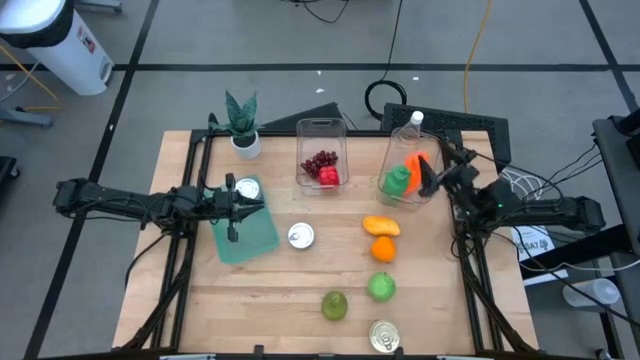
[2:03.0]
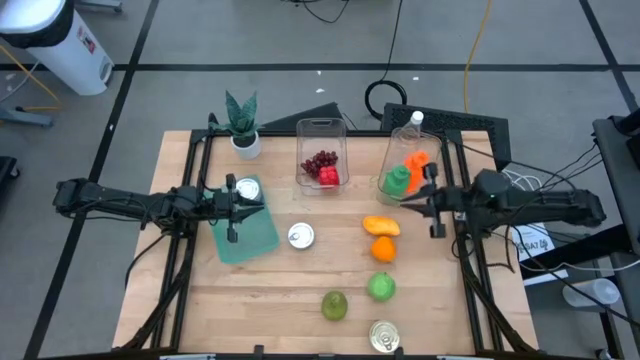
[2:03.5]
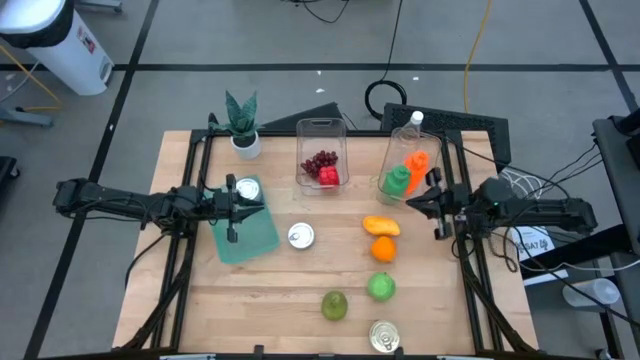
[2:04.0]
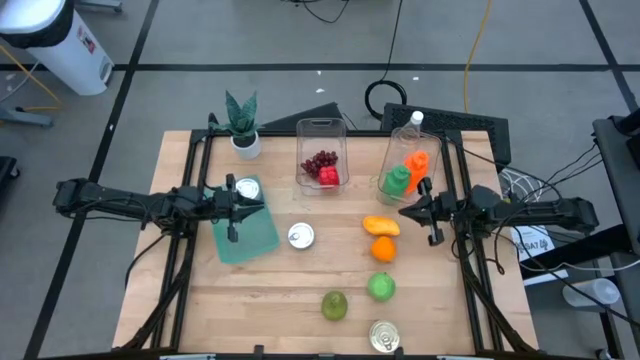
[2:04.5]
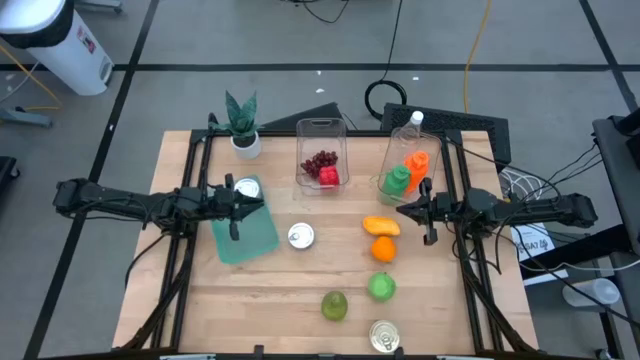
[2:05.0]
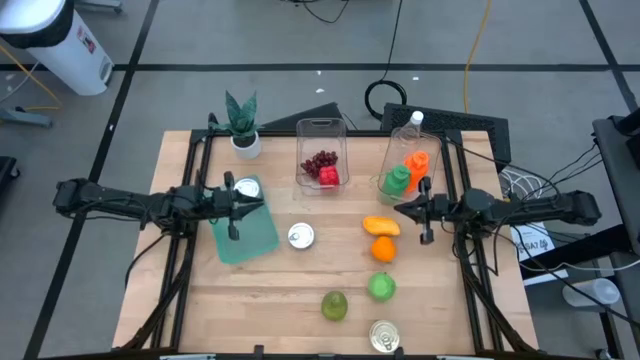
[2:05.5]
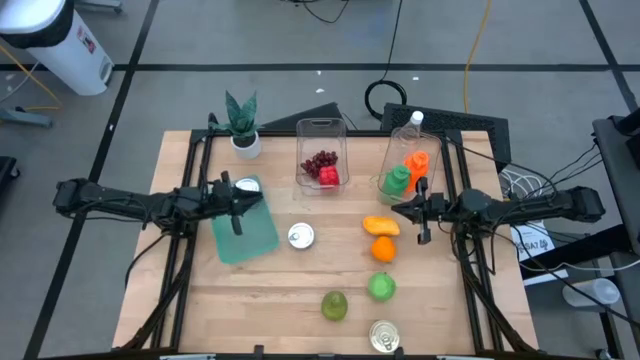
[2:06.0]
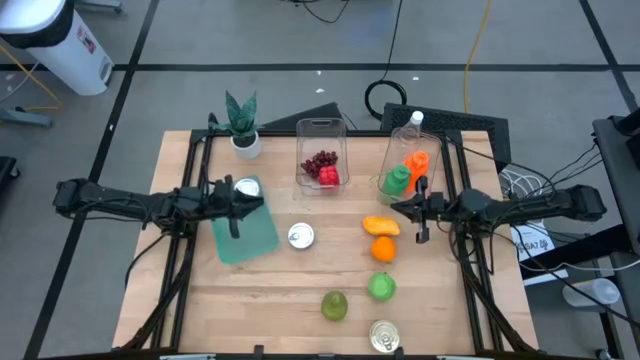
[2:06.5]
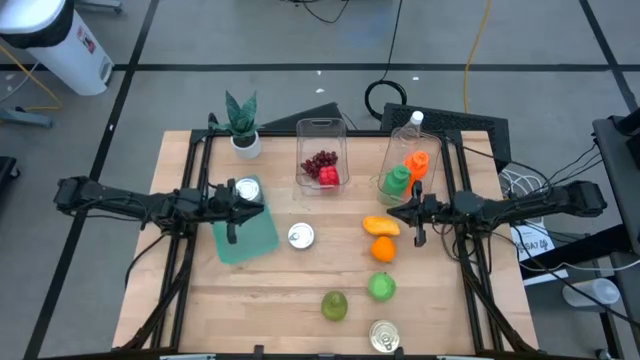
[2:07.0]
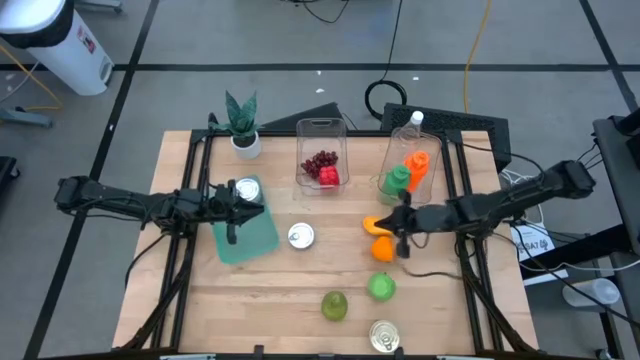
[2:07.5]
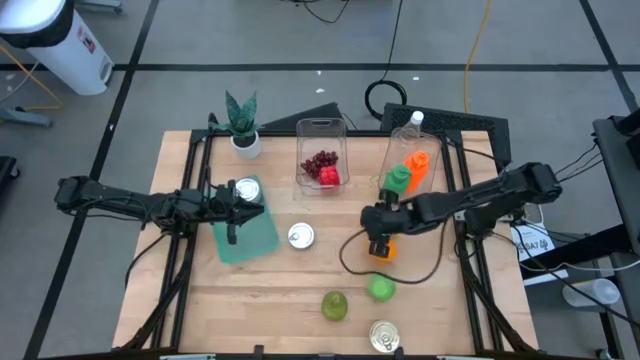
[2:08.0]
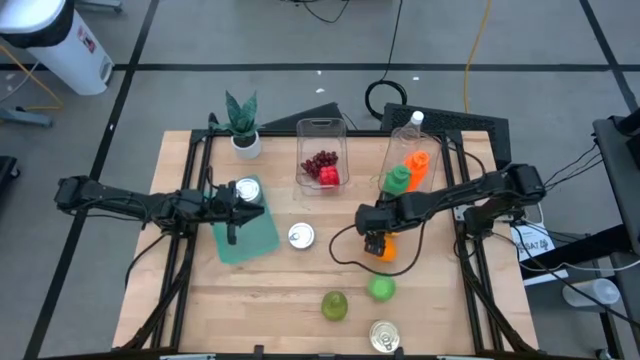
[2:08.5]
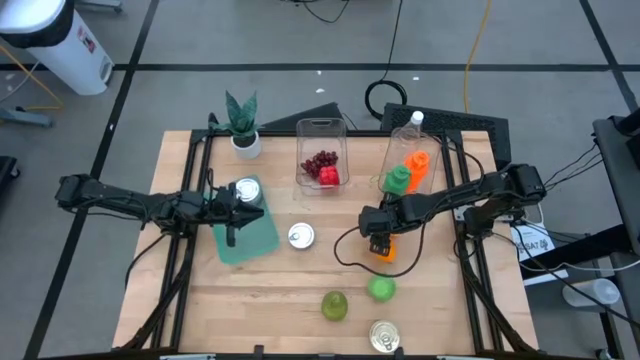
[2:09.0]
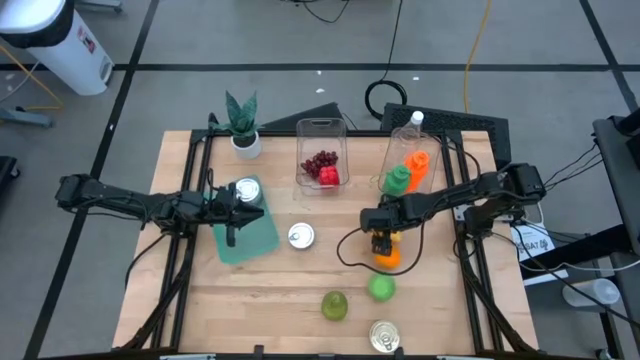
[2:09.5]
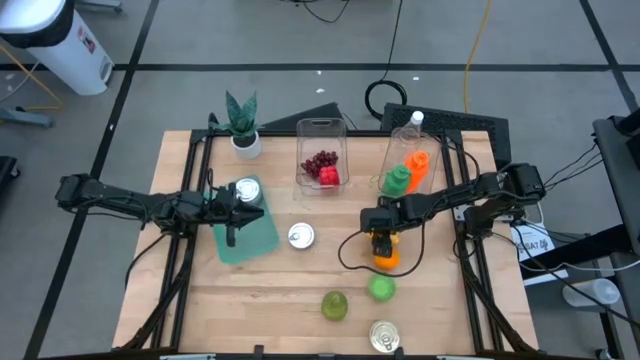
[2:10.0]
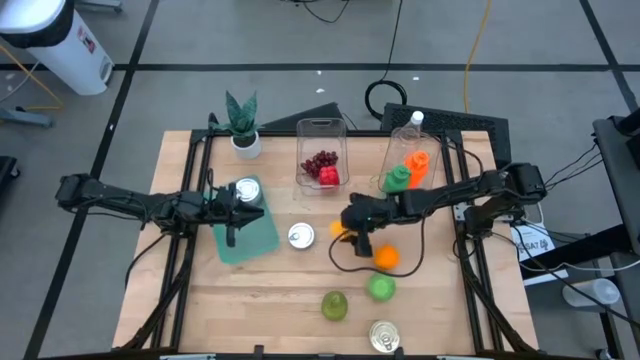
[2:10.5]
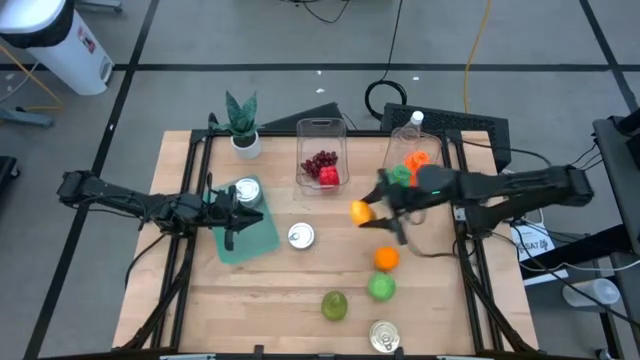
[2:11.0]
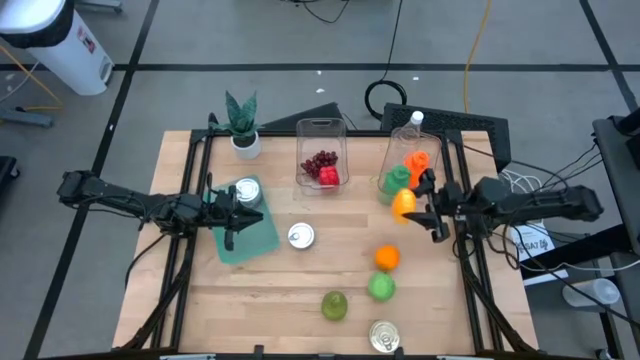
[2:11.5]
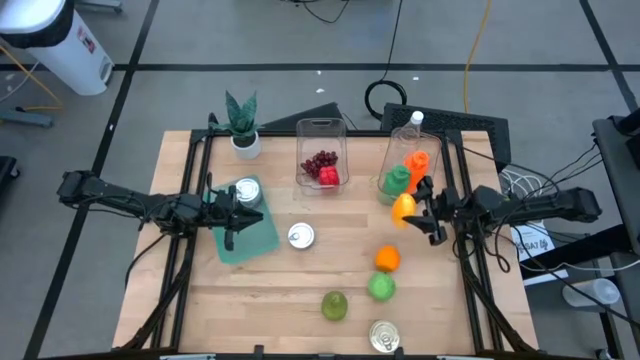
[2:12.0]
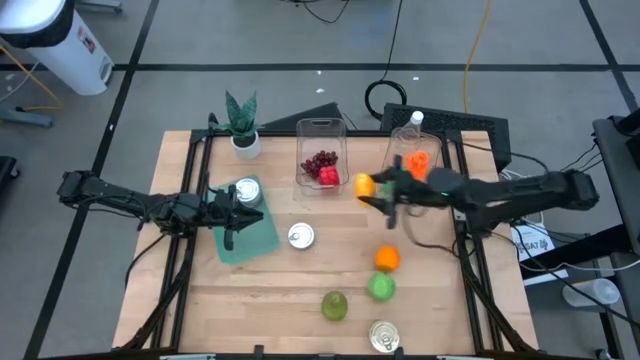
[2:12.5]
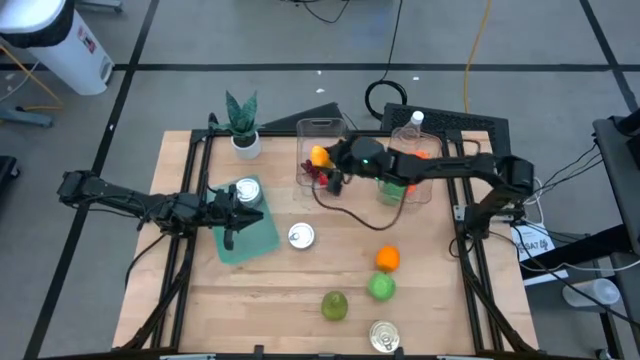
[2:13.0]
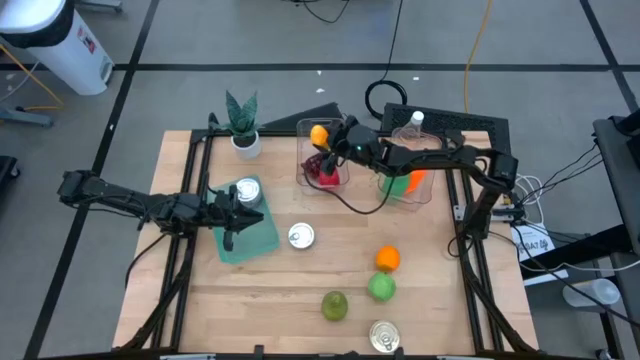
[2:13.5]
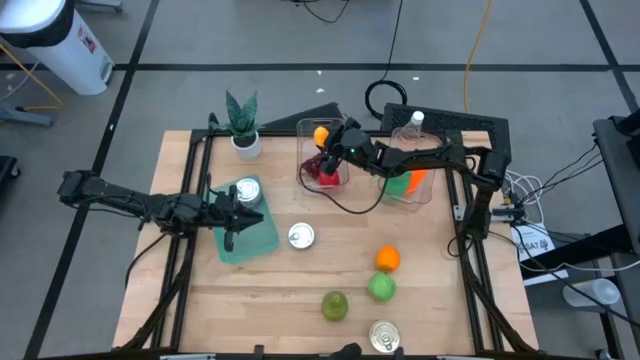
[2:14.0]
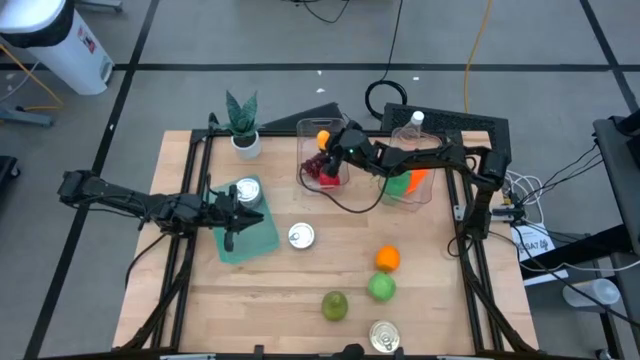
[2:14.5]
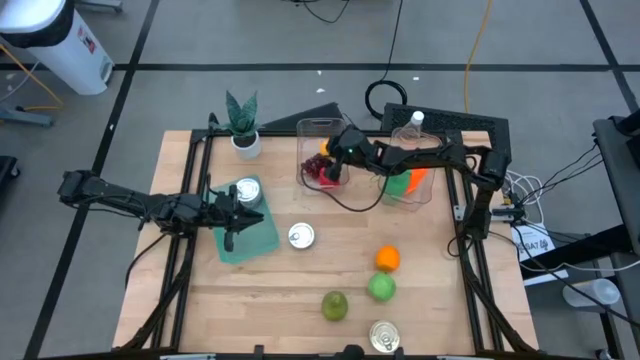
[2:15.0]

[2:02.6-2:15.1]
Task: Pick & Place Food Item
Put the mango into the left transparent bin

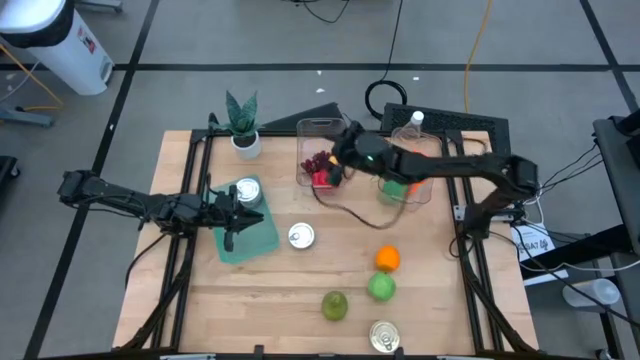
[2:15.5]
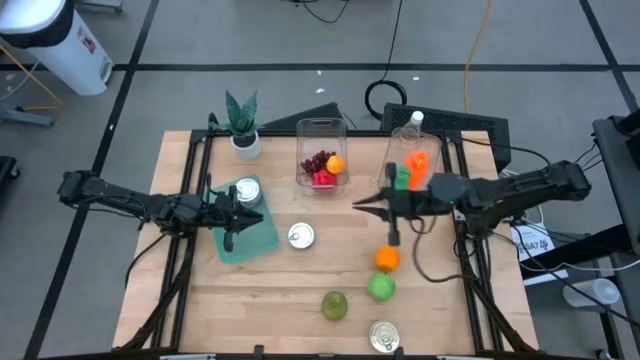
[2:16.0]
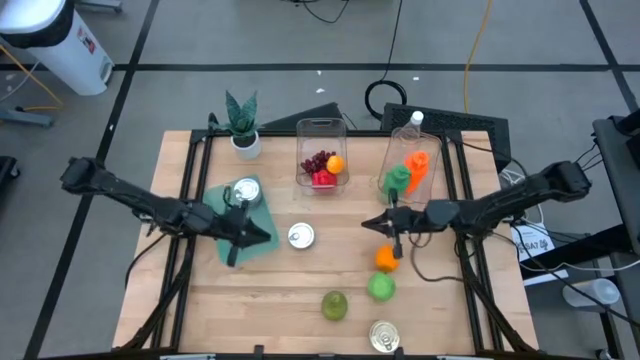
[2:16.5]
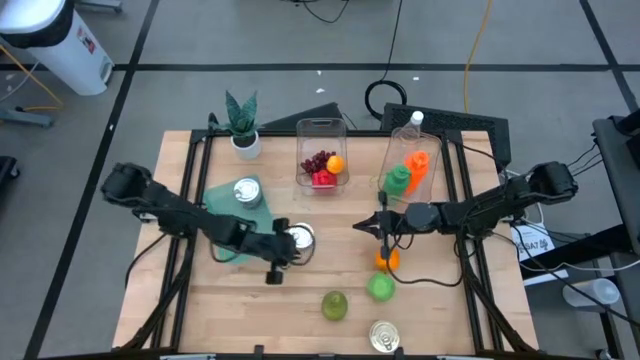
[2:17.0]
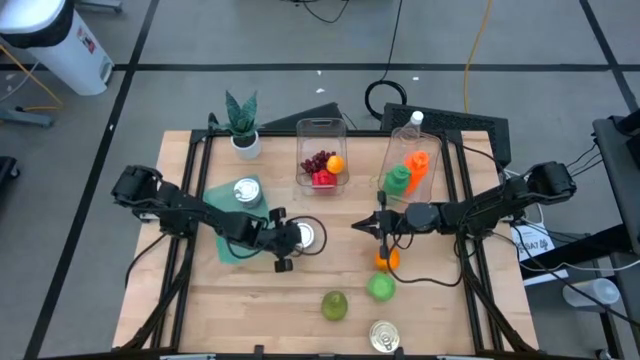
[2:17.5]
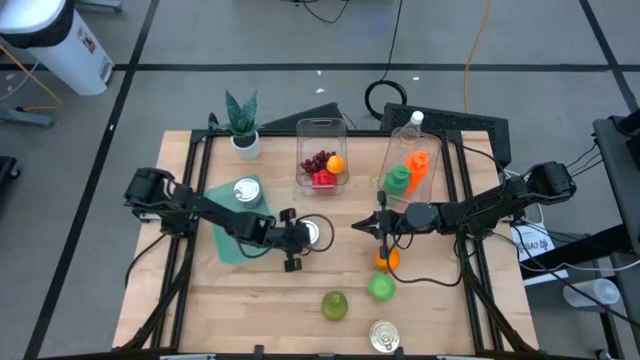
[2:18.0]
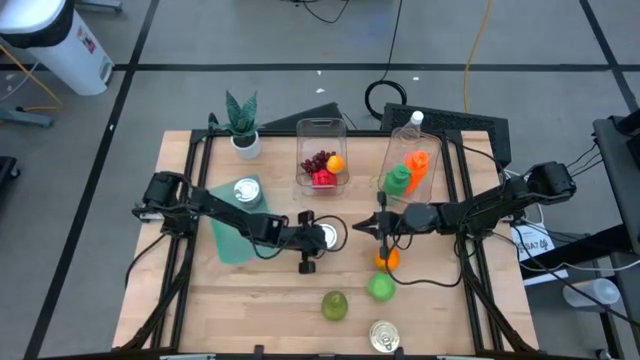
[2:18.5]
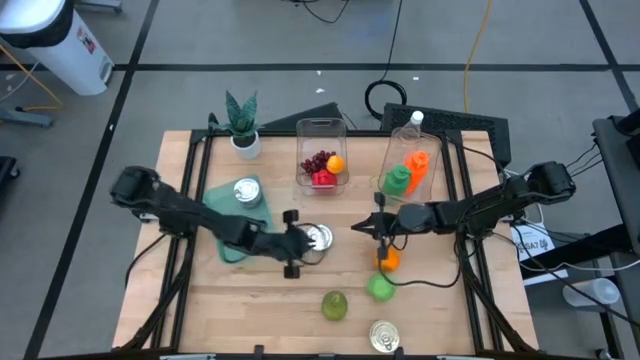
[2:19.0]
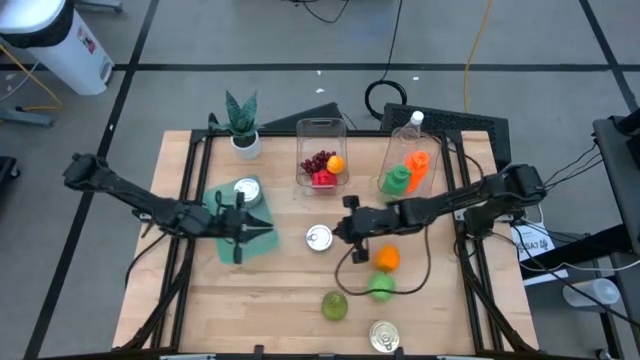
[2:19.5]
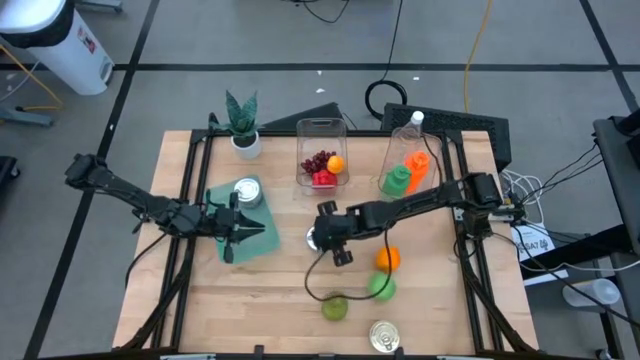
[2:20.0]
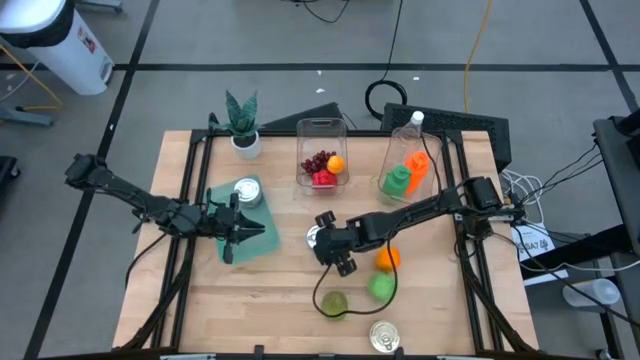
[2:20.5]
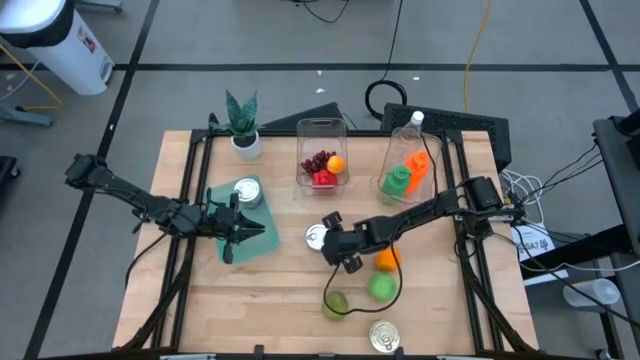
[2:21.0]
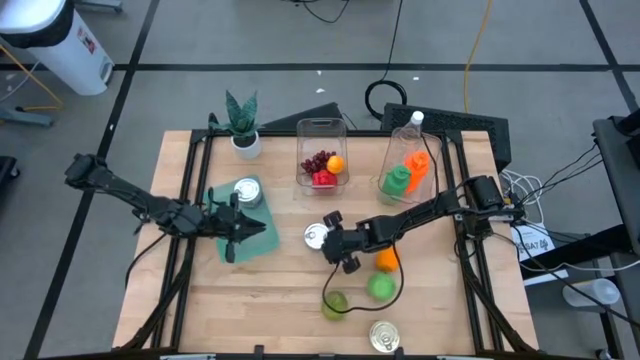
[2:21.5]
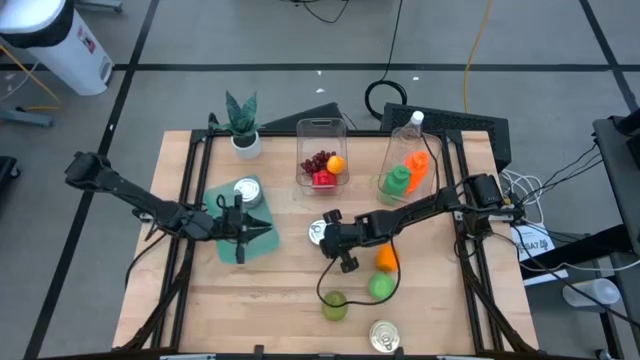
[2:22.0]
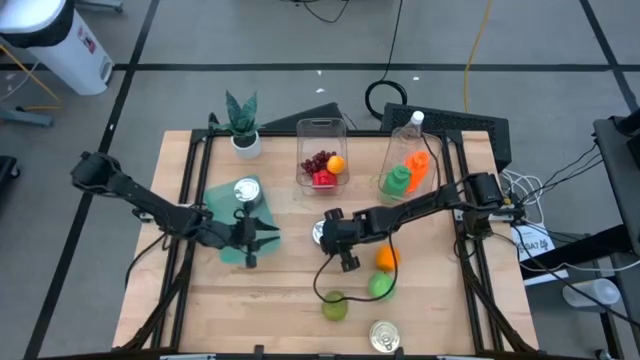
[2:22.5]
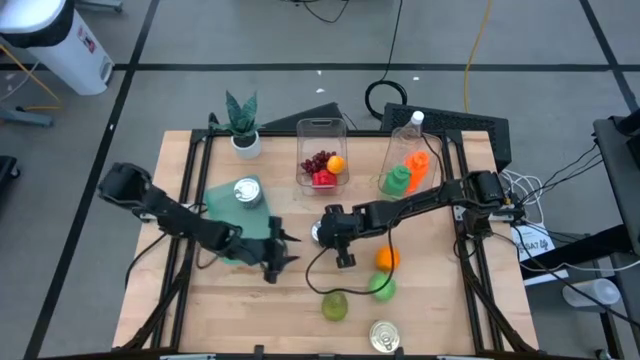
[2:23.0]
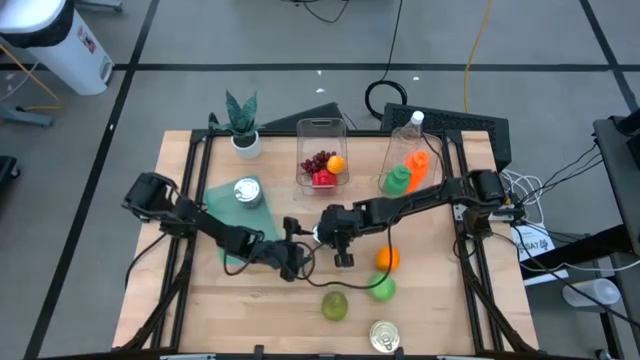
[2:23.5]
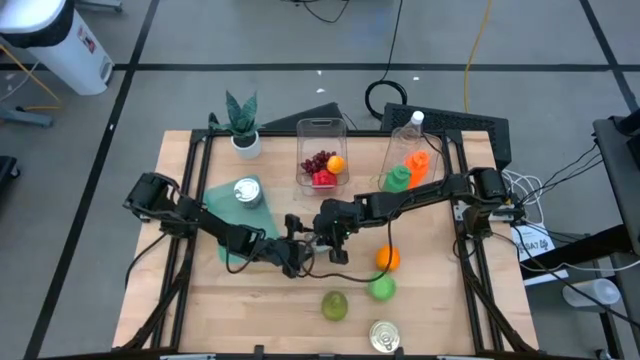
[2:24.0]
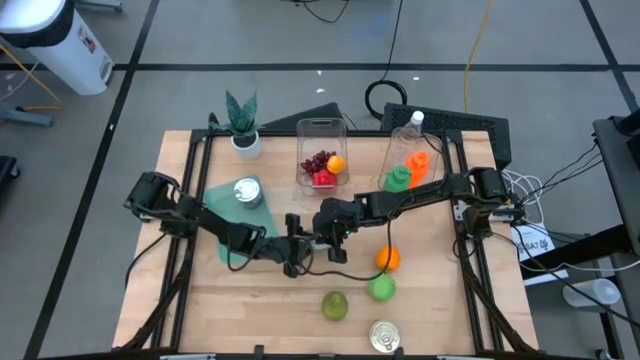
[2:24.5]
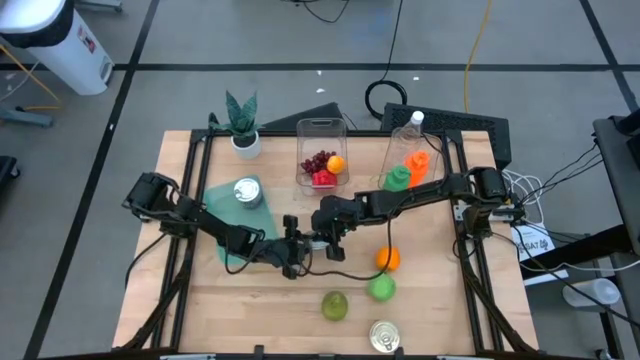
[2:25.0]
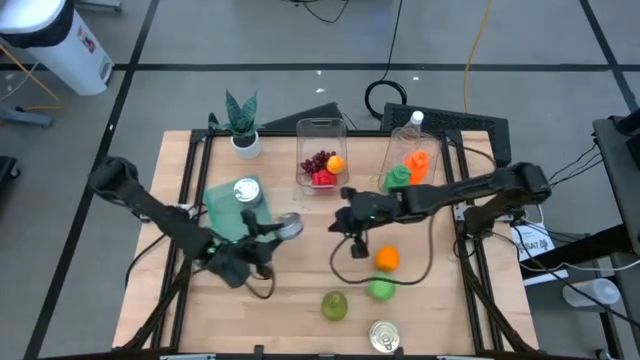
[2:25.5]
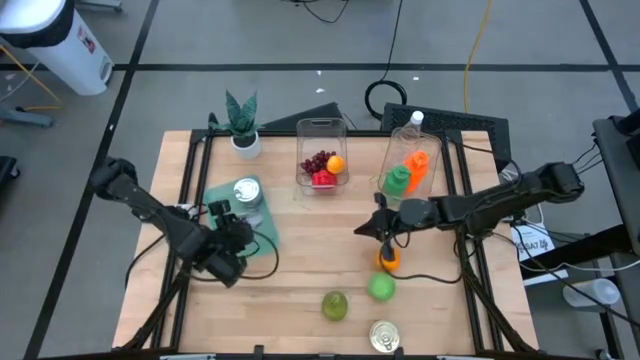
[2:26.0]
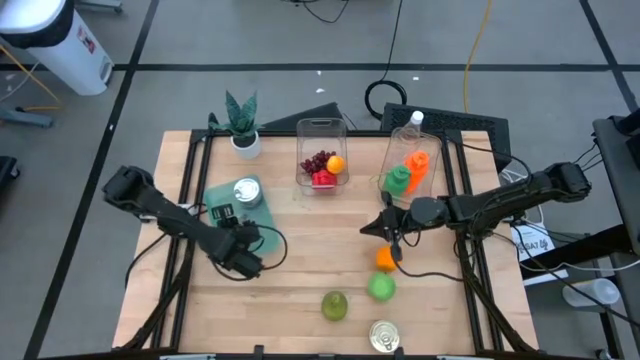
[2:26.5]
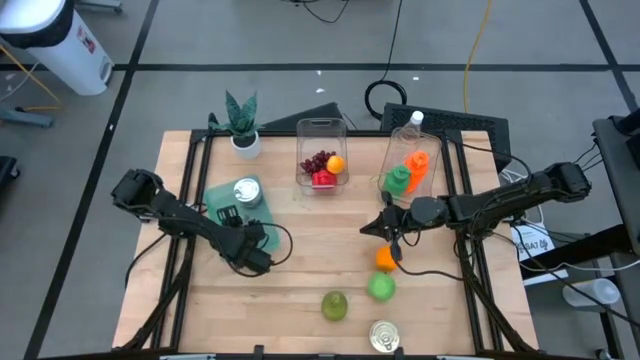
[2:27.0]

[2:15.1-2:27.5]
Put the green tuna can into the blue bin
